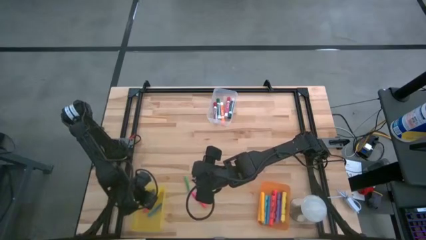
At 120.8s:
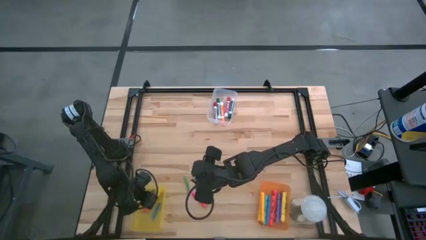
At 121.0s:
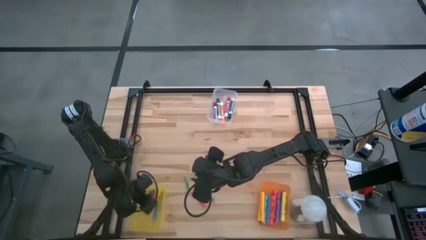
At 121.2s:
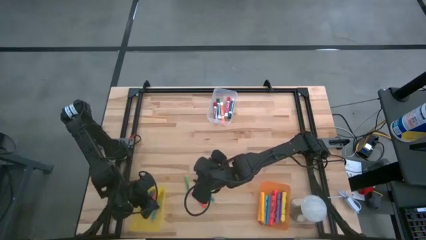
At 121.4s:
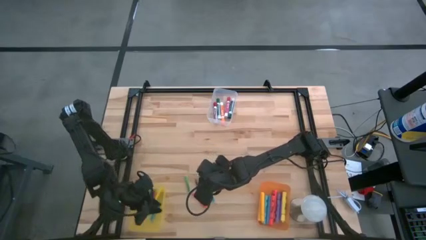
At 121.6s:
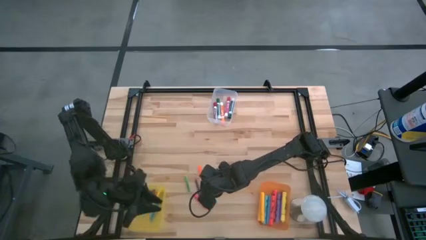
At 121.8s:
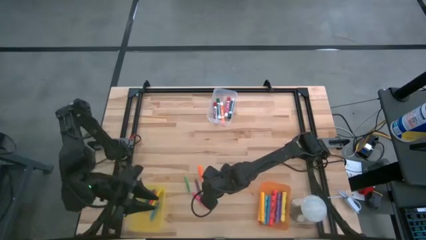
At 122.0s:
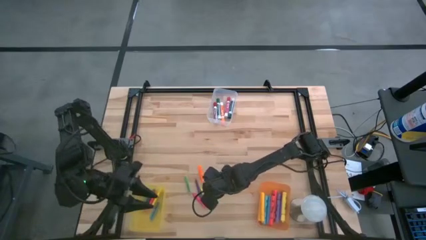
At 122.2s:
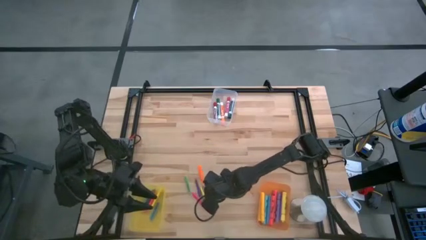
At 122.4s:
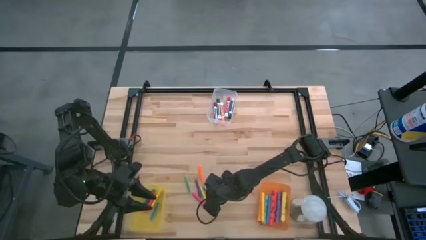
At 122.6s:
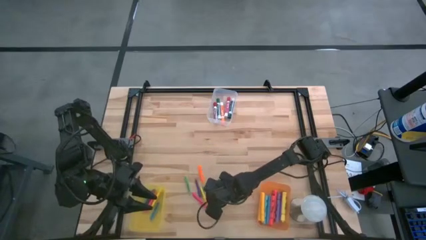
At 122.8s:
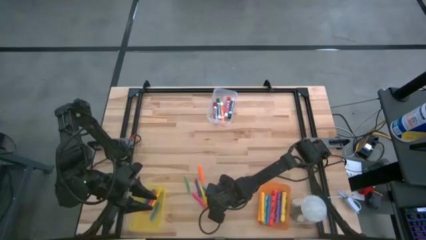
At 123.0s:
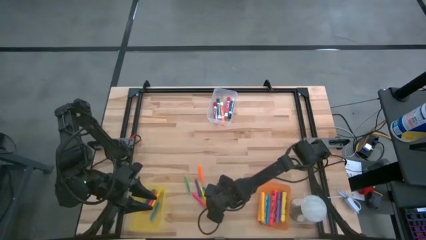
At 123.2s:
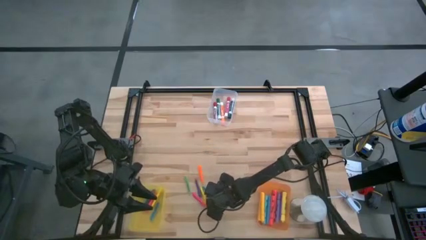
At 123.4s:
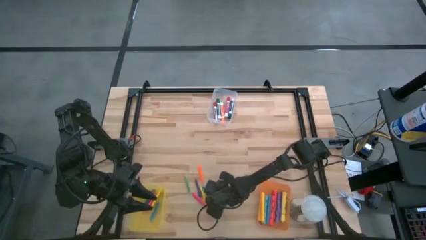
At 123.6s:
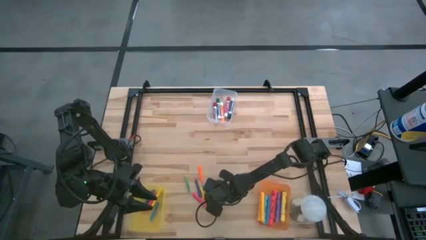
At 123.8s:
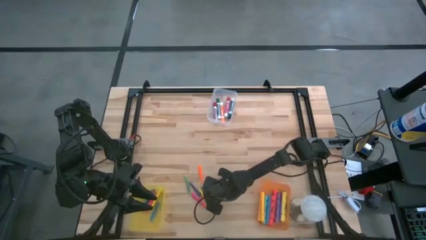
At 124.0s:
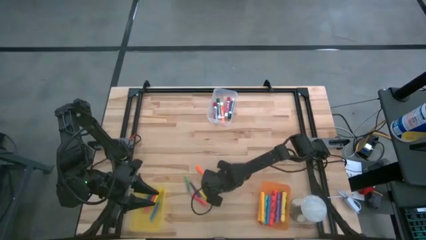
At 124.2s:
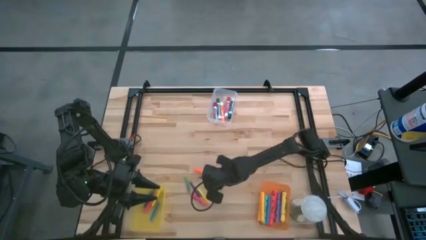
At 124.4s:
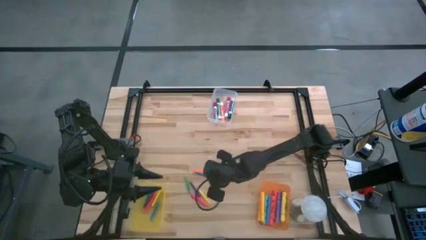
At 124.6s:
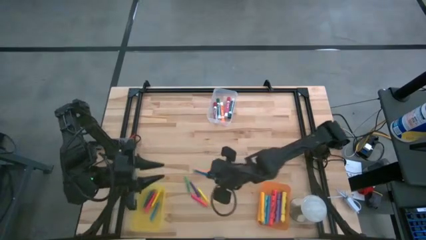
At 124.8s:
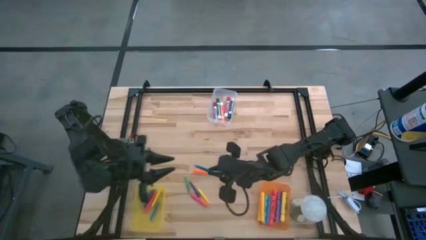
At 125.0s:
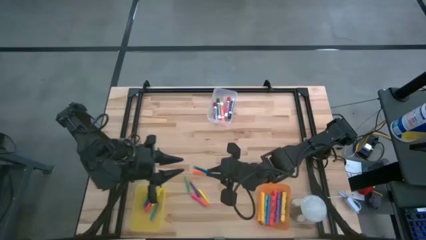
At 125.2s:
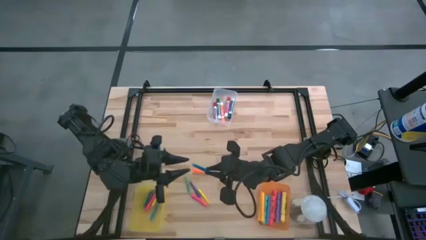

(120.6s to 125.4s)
Task: Pick & Place Markers
Put the blue highlighter into the yellow bin

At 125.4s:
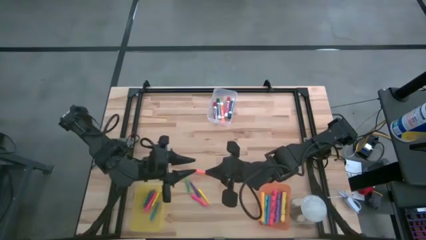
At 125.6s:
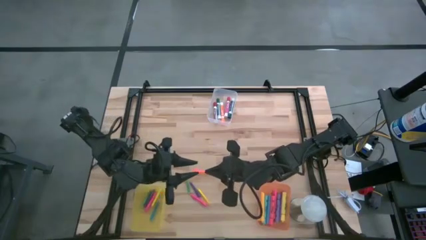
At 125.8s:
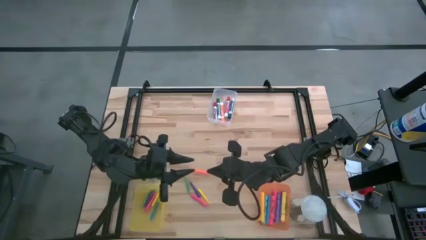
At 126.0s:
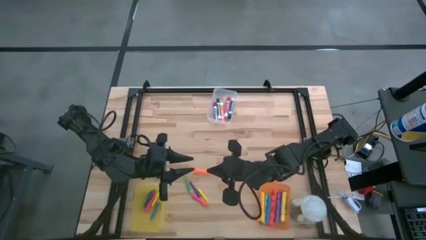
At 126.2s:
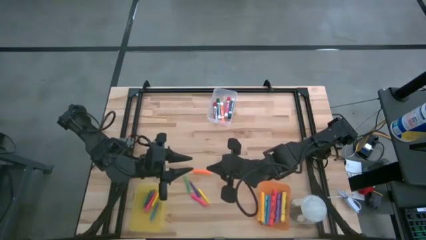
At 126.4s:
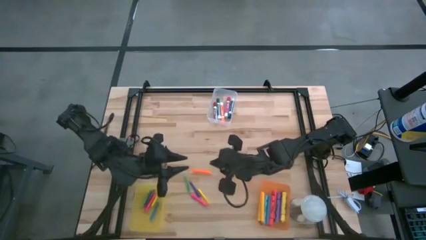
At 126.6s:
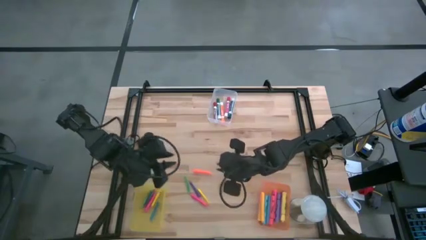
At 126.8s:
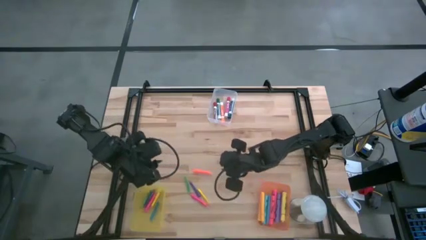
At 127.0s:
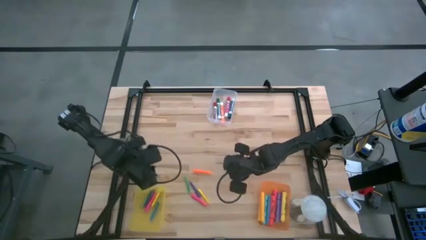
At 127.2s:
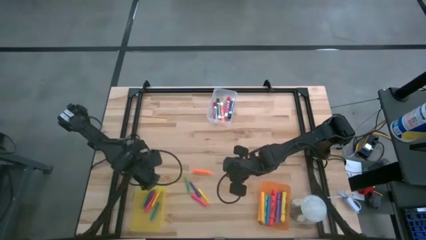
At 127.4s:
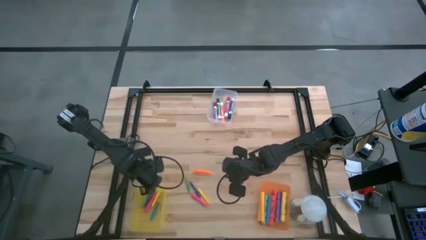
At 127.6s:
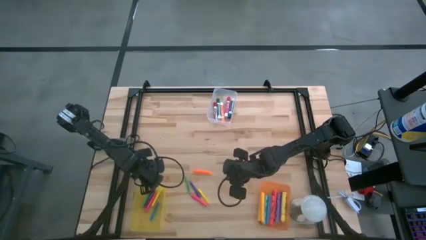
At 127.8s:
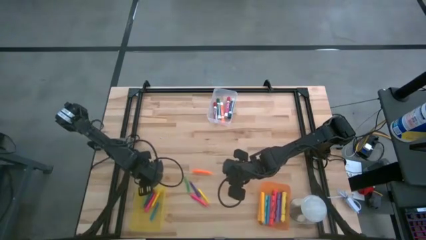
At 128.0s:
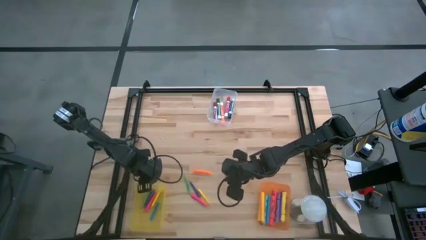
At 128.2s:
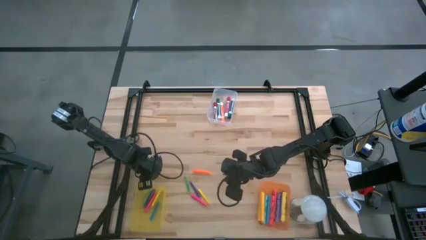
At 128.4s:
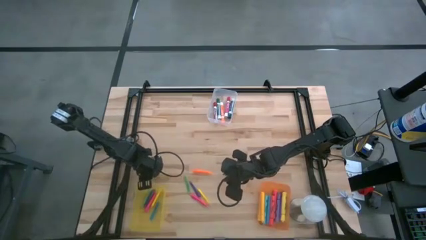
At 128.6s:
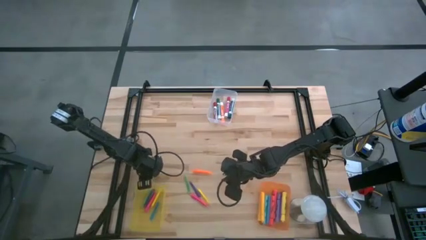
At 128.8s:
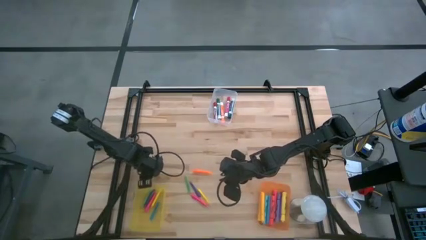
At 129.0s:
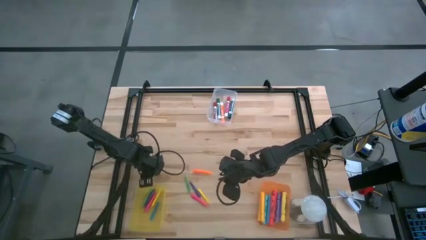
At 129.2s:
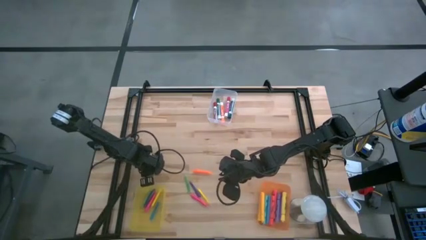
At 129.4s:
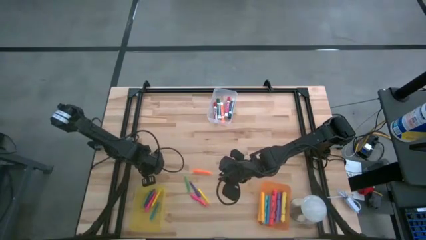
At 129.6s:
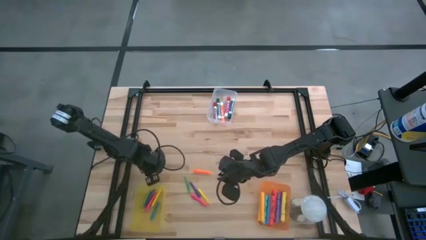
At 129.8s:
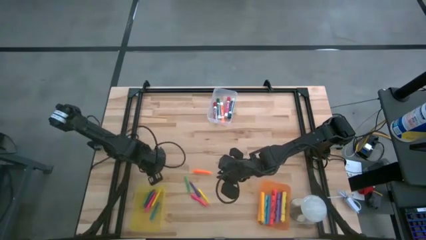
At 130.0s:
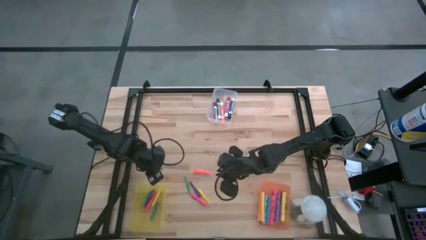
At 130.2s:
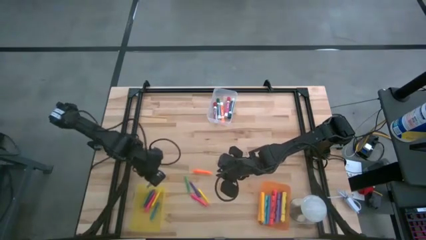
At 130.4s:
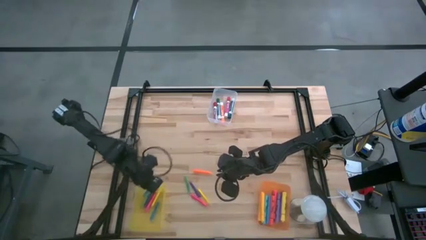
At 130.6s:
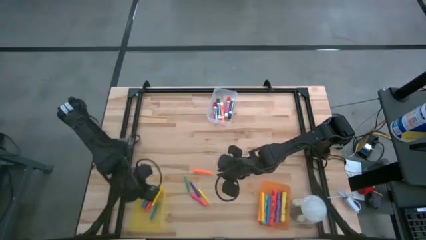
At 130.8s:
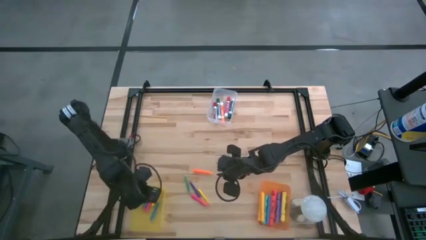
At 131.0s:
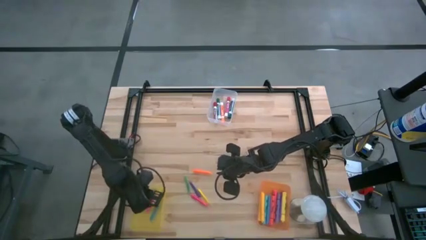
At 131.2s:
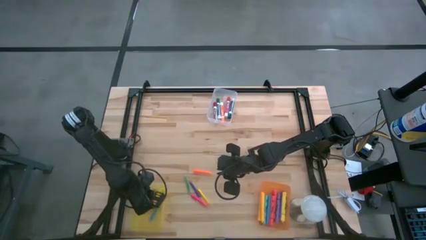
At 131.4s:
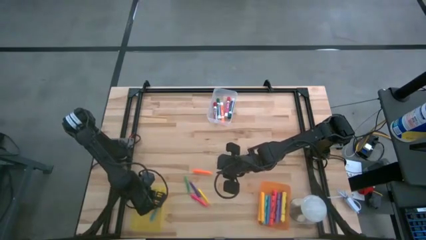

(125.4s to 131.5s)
Put the blue highlighter into the yellow bin

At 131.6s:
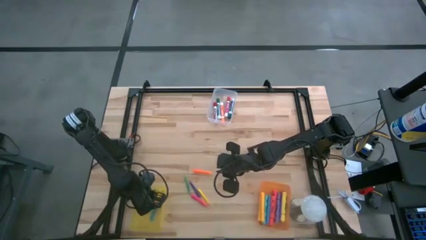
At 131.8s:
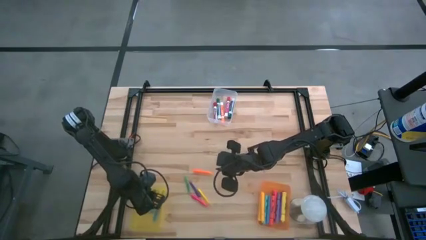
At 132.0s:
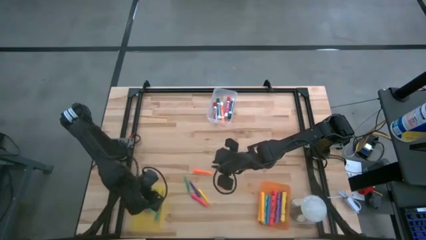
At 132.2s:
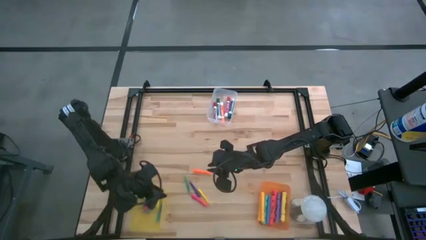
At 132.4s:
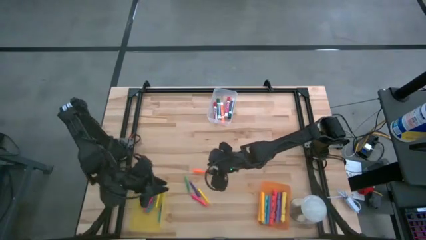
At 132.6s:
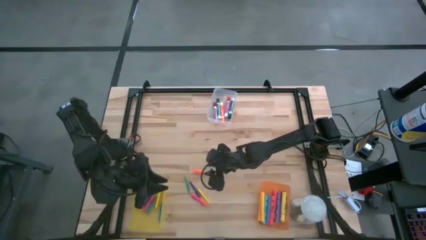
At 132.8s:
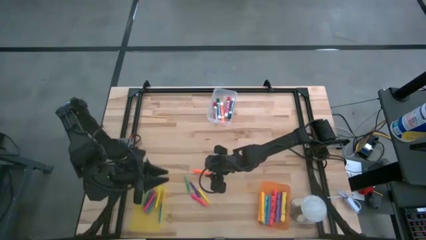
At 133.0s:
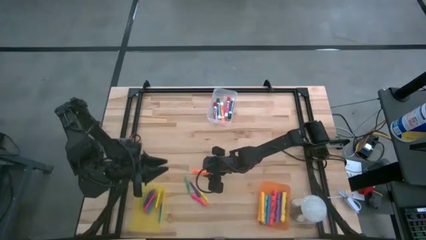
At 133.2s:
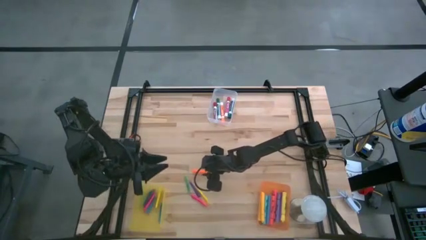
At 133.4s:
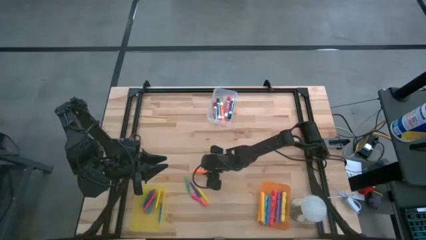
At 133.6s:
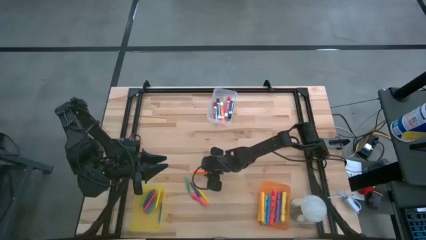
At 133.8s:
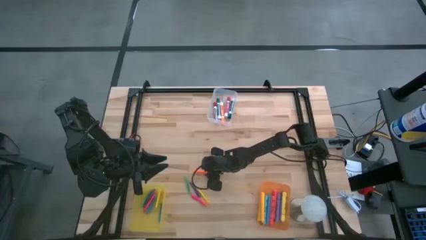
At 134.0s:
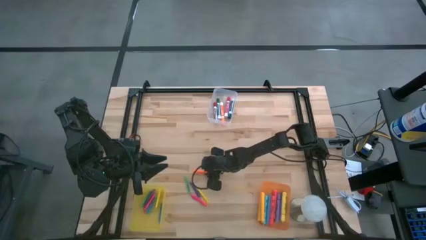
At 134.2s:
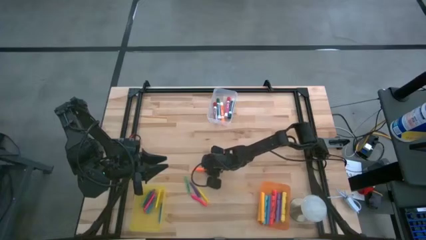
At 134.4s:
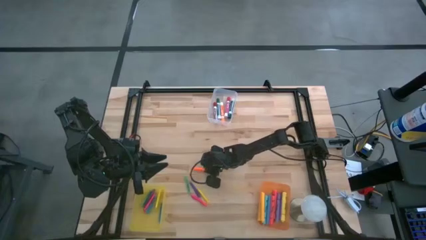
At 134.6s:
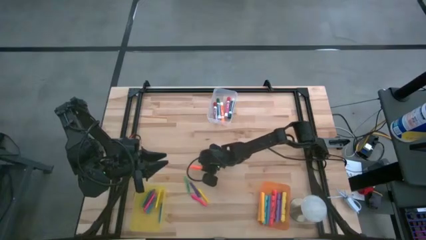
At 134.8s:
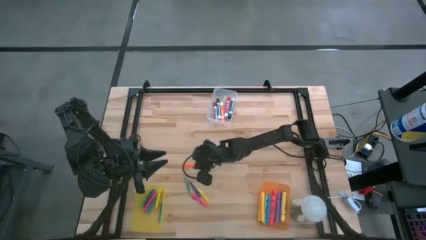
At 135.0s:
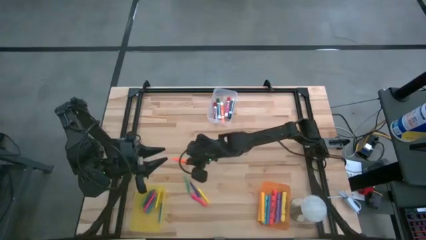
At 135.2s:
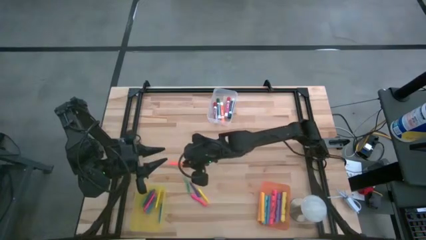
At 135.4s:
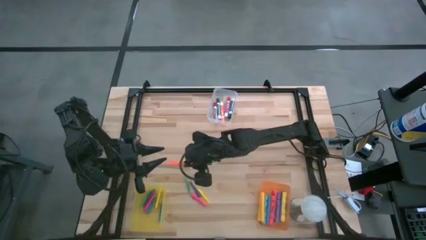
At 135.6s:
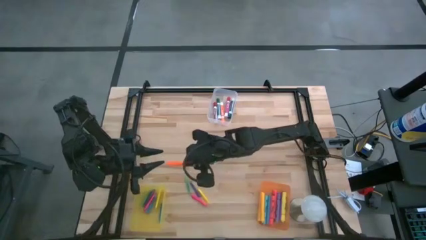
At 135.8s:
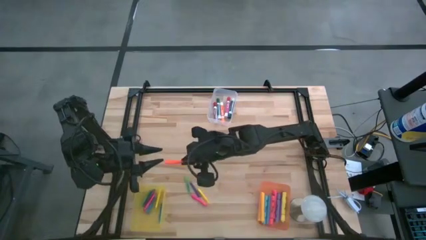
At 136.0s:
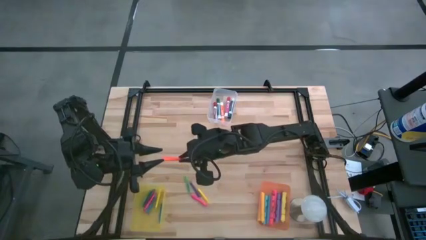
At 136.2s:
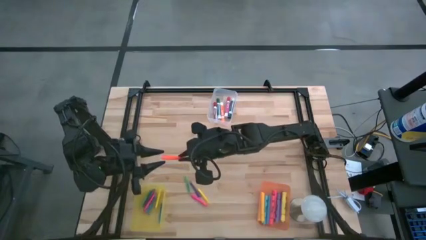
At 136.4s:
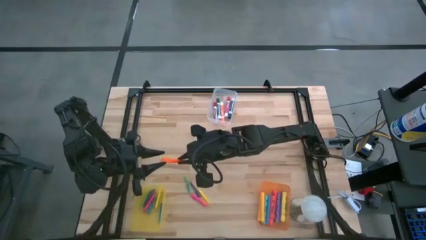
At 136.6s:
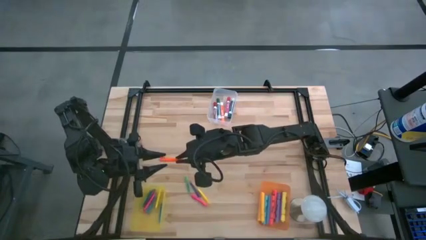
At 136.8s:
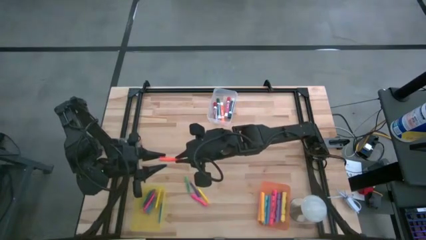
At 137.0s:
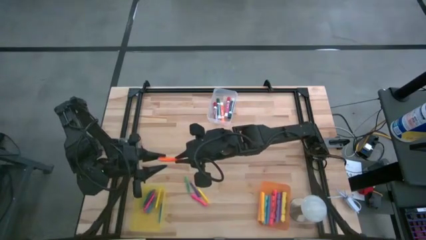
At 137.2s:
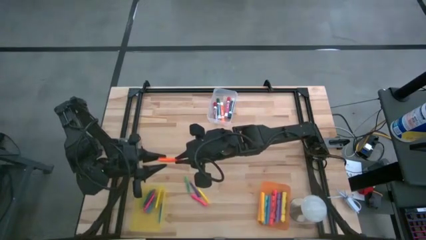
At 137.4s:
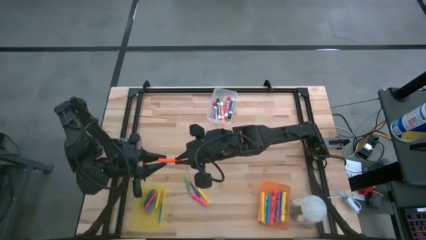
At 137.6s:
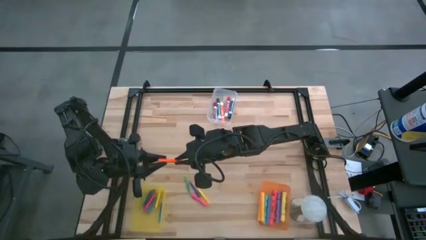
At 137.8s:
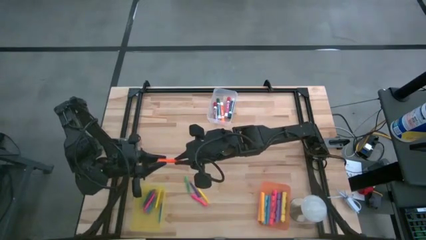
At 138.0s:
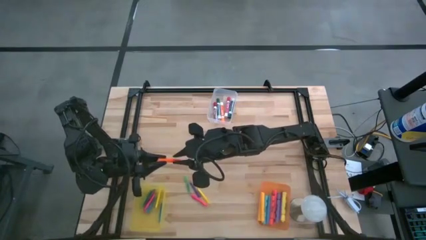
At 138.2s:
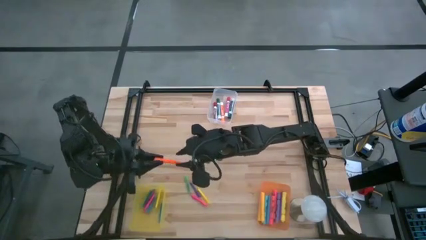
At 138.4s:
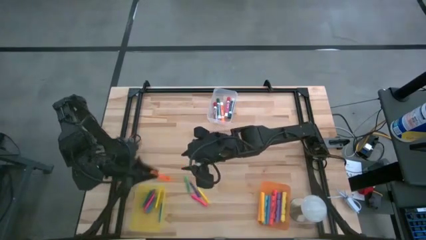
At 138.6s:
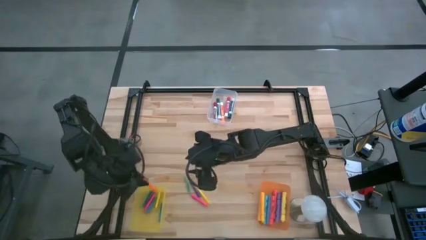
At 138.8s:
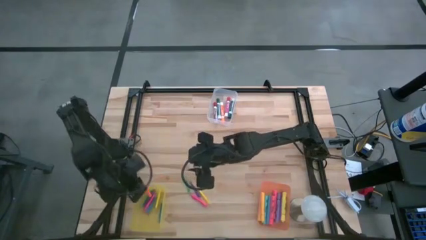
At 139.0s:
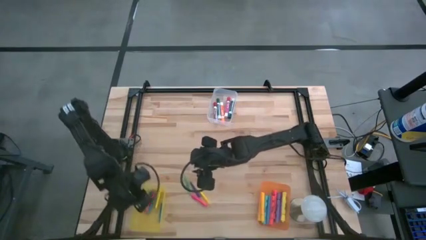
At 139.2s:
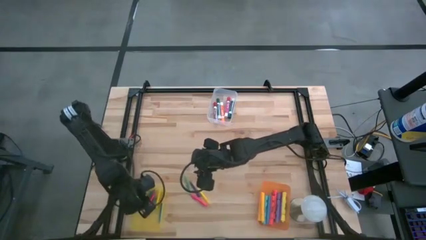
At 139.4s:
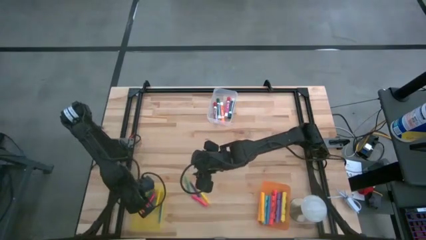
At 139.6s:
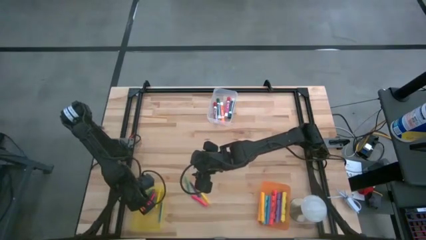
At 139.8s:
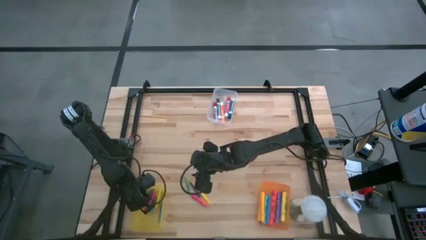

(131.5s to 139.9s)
Put the orange highlighter into the yellow bin
